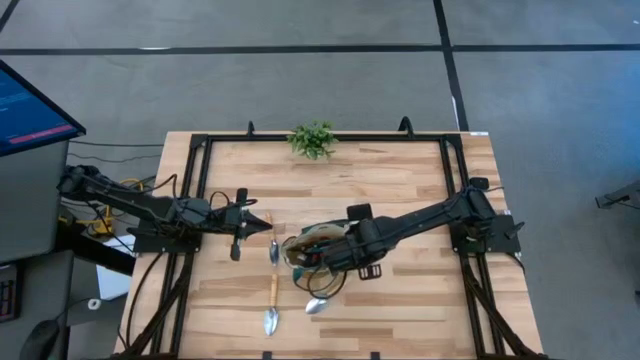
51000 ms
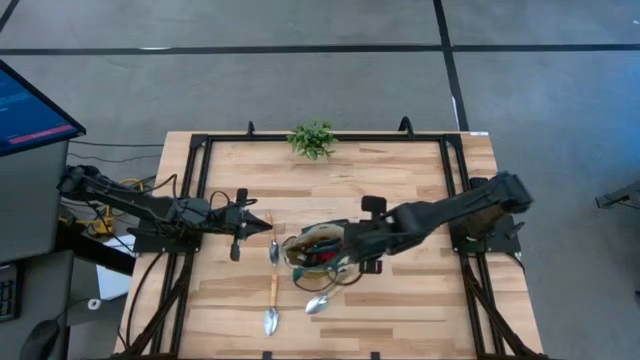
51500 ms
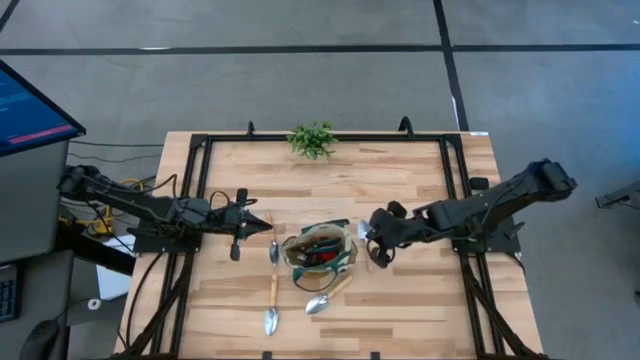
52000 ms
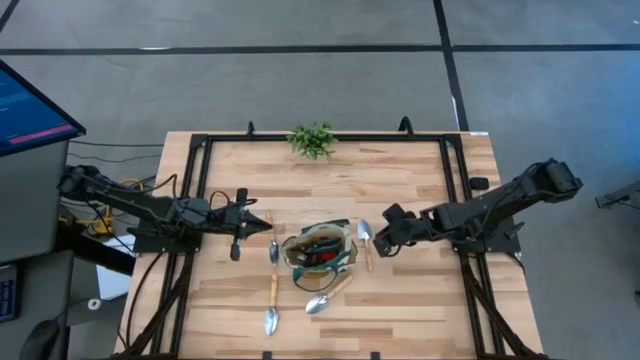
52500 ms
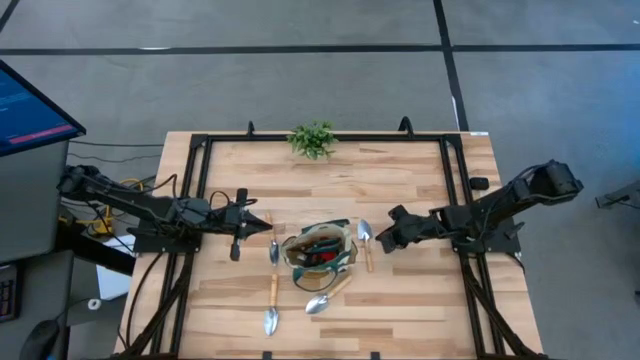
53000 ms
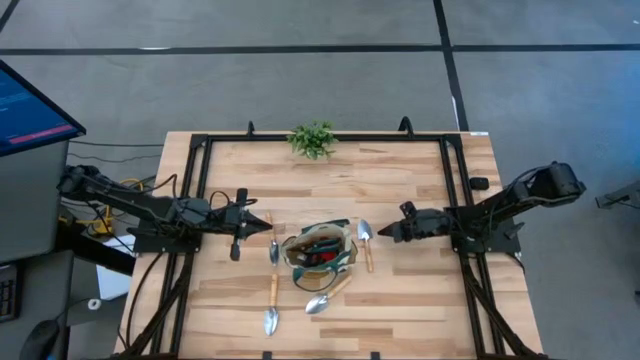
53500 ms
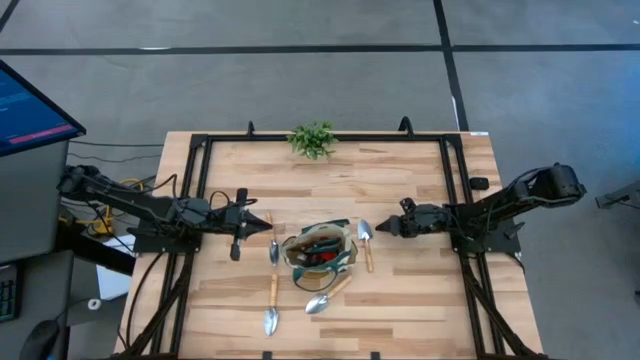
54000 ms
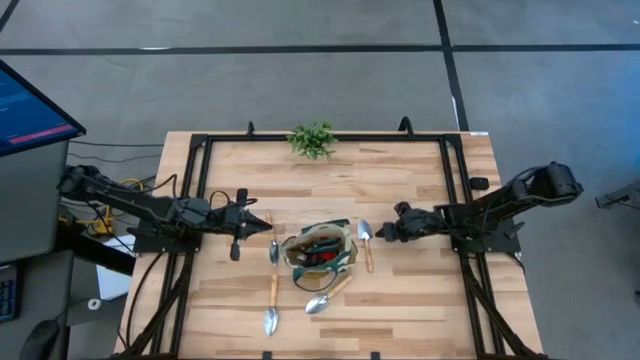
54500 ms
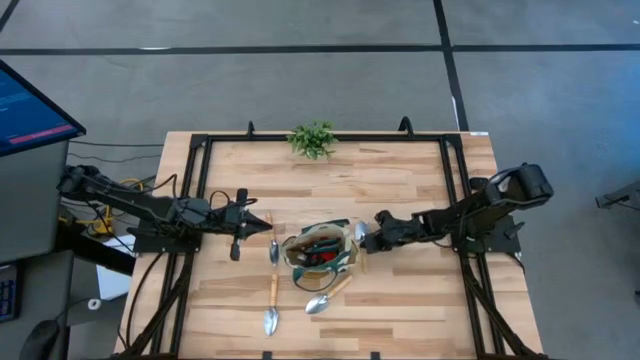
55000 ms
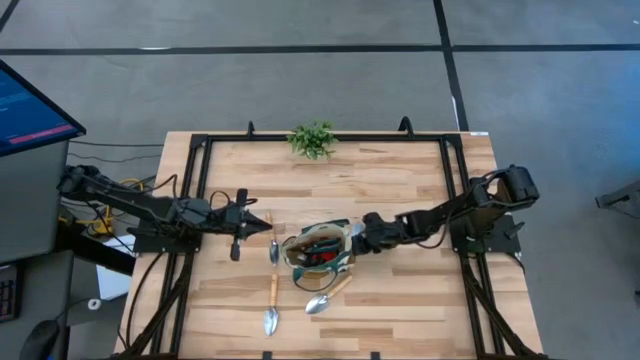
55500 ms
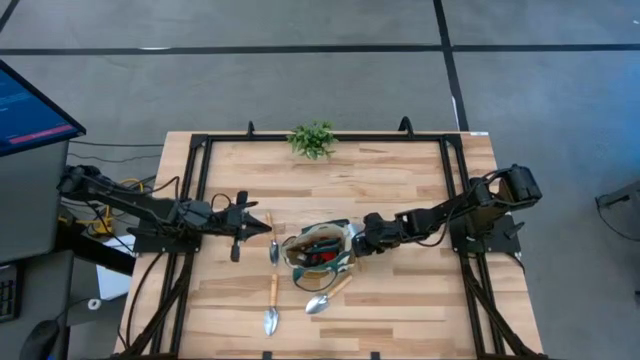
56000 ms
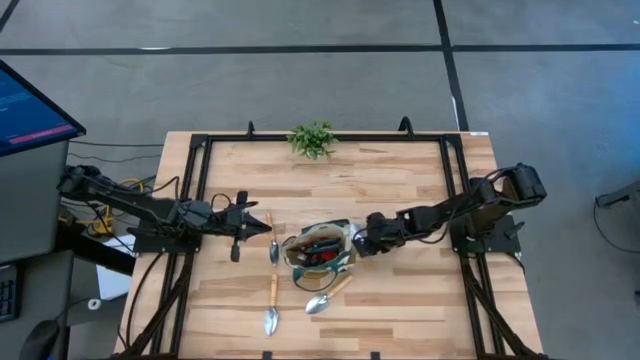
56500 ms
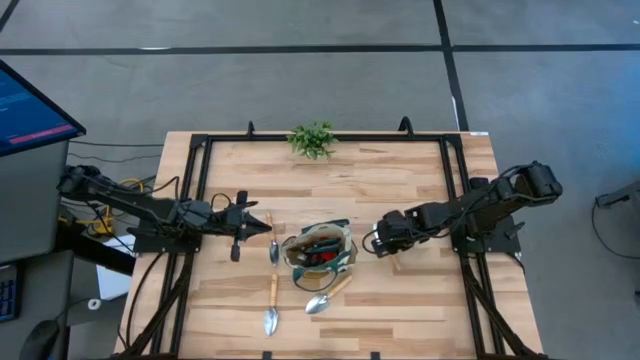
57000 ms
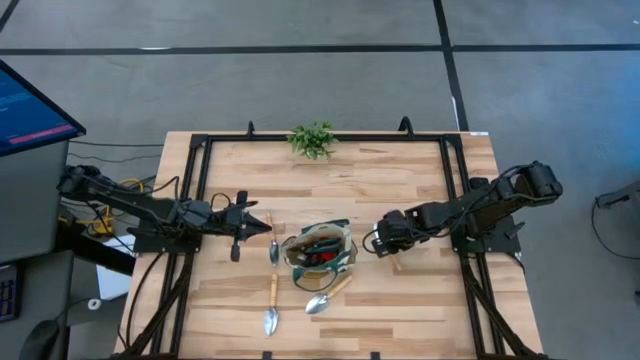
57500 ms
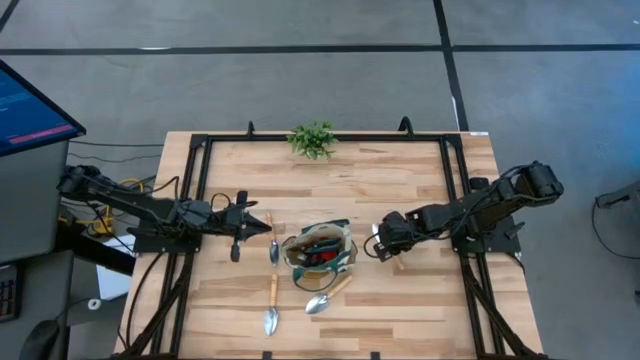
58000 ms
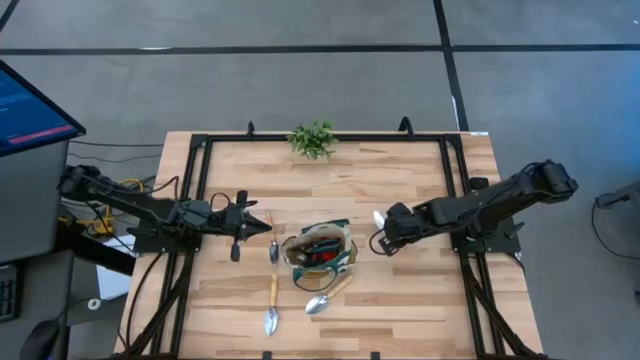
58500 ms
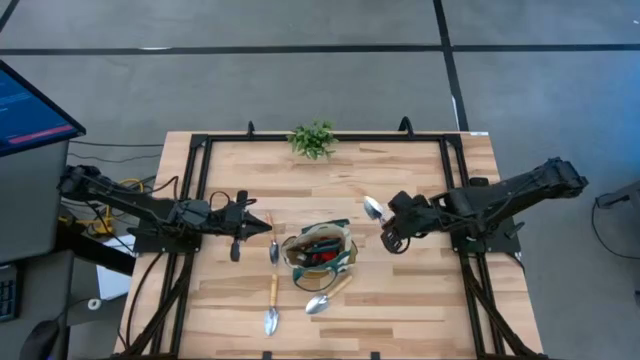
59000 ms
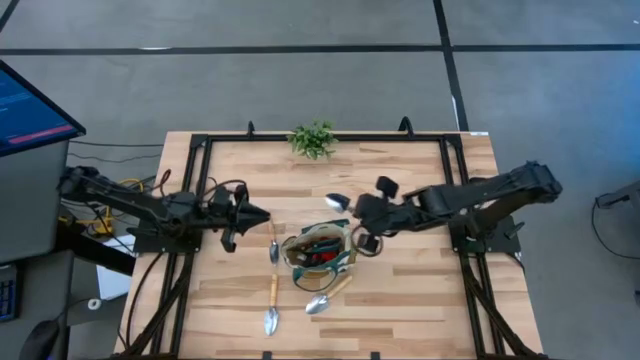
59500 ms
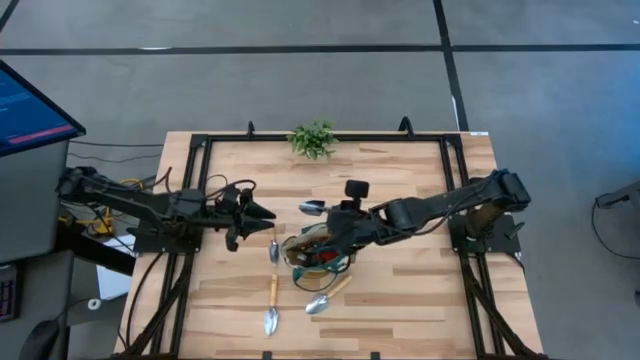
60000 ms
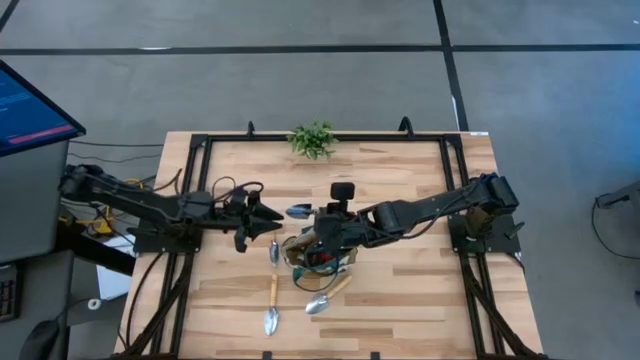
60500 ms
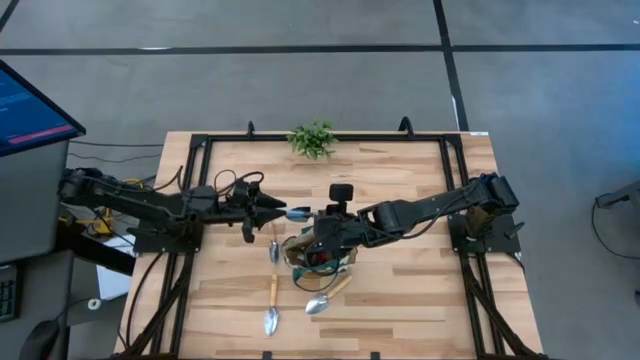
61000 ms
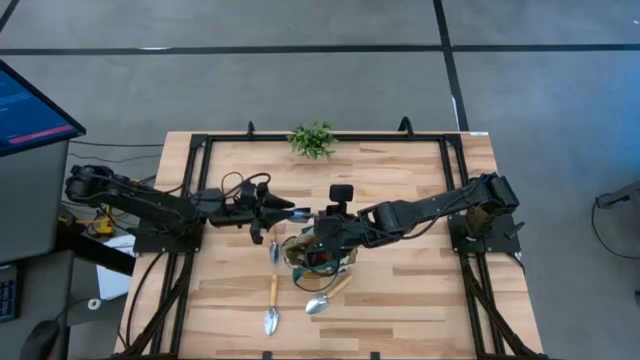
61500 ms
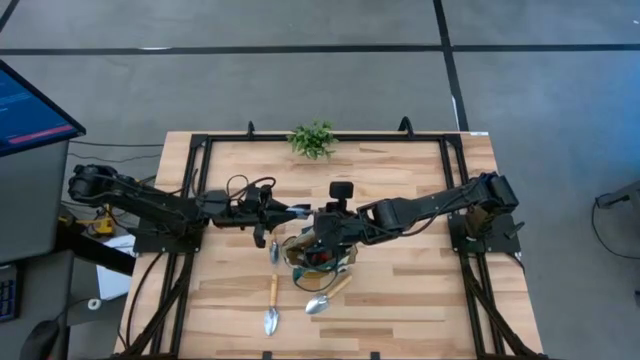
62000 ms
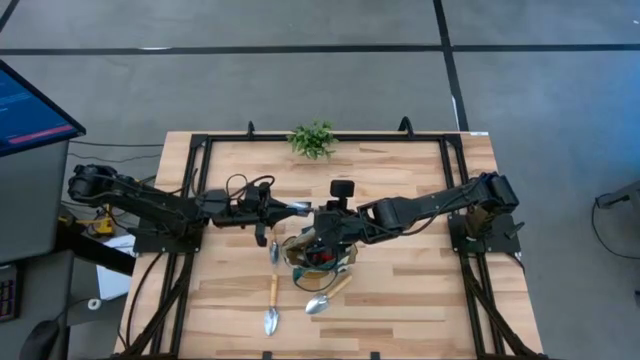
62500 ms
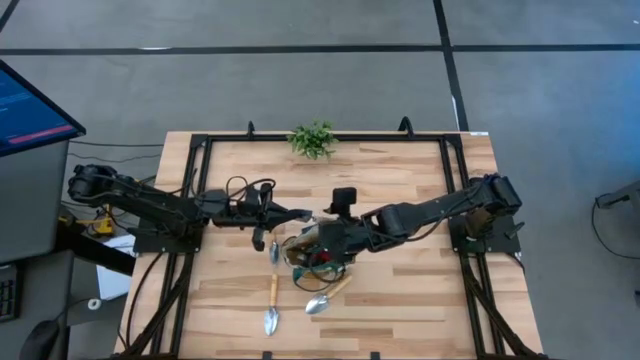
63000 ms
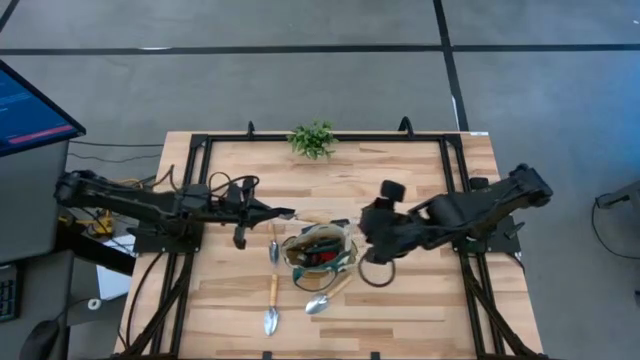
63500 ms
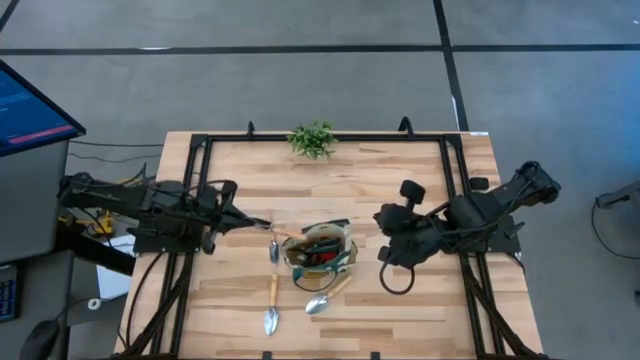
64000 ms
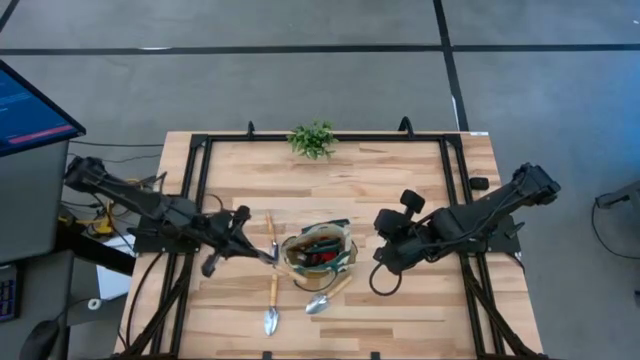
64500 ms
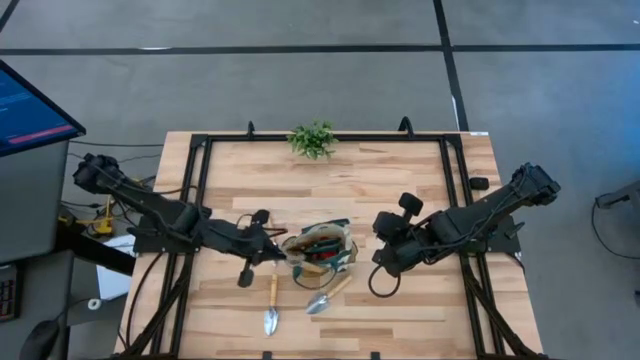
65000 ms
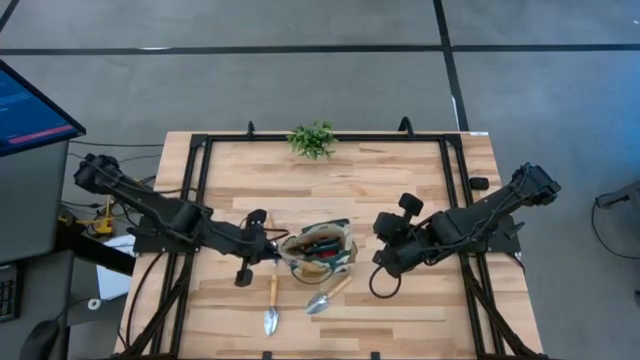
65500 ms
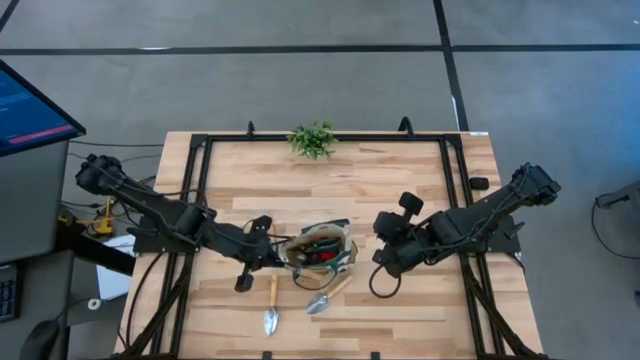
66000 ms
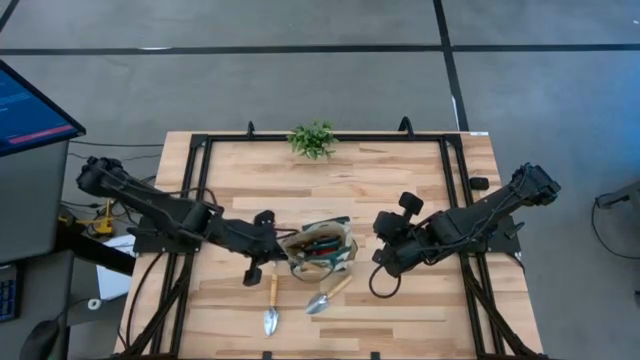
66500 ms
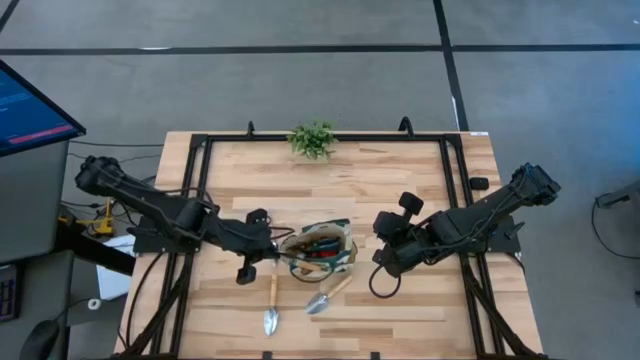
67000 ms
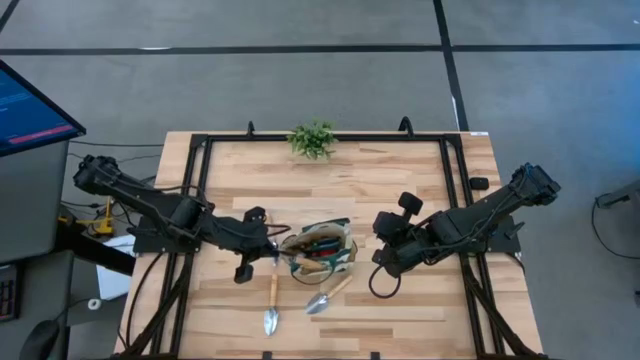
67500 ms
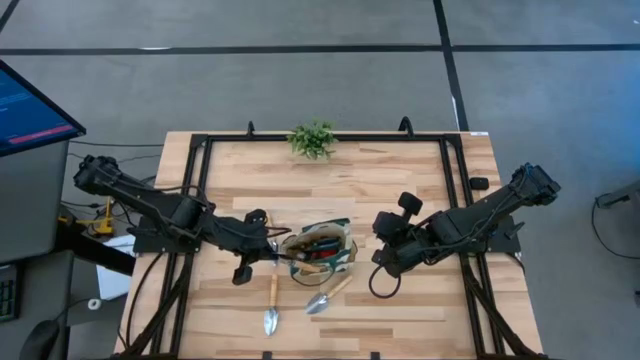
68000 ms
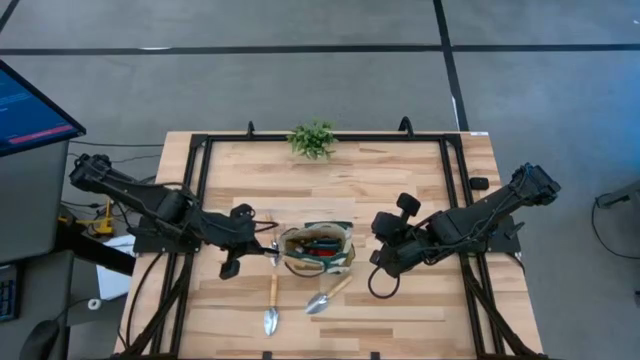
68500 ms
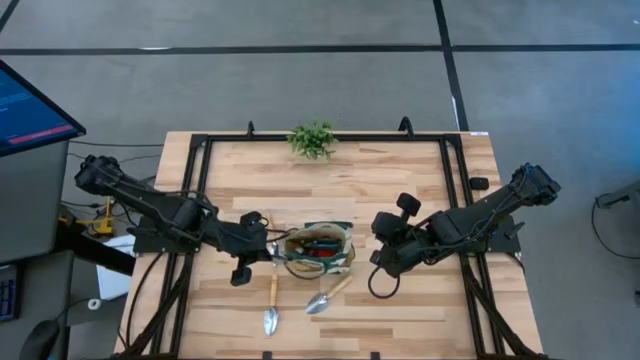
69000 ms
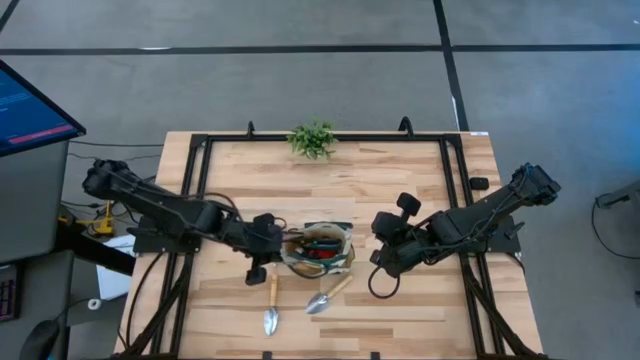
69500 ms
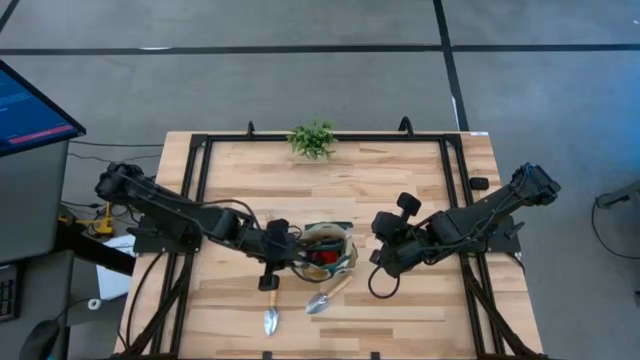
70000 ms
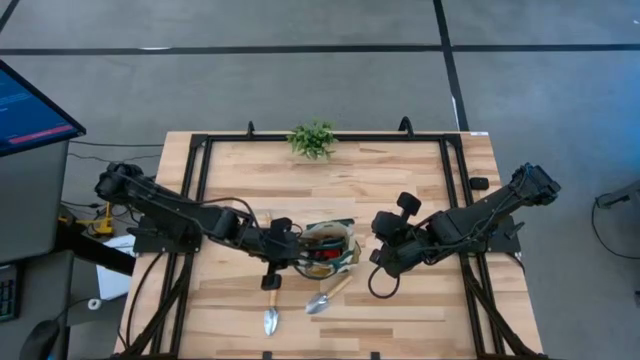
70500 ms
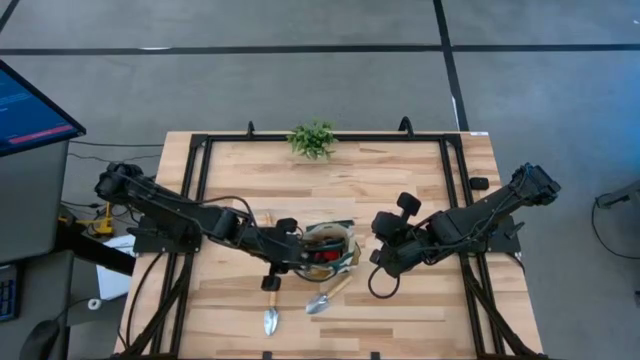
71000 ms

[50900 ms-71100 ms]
Task: Pick & Place Garden tools in Gardening bag
Put the top right trowel into the gardening bag
